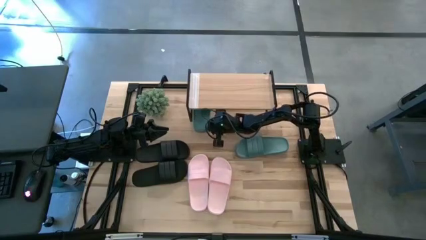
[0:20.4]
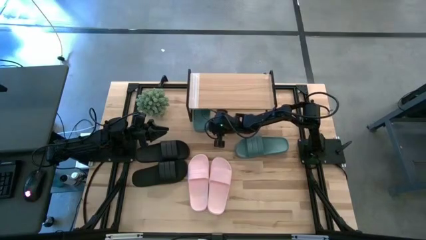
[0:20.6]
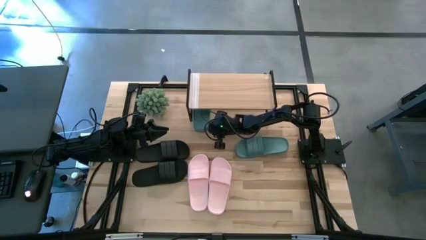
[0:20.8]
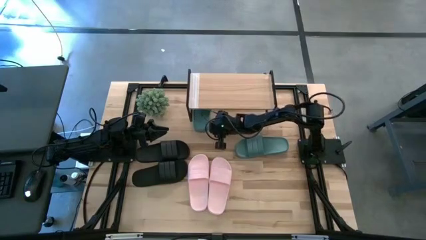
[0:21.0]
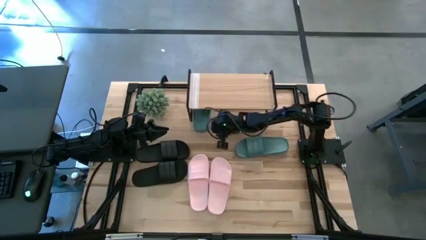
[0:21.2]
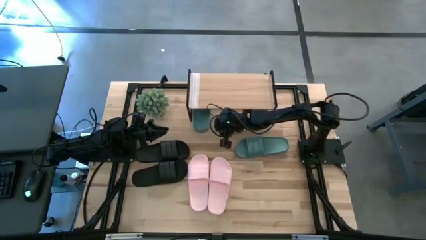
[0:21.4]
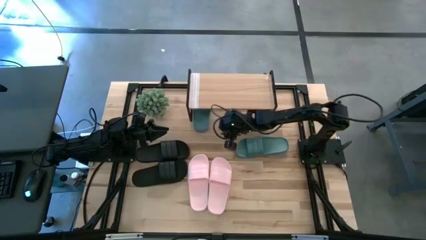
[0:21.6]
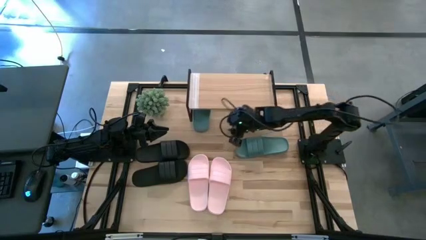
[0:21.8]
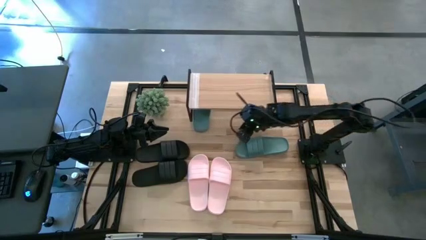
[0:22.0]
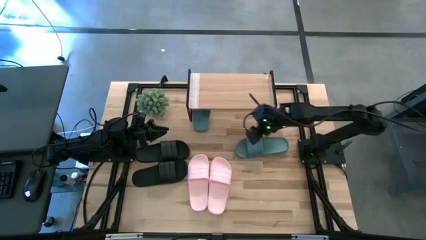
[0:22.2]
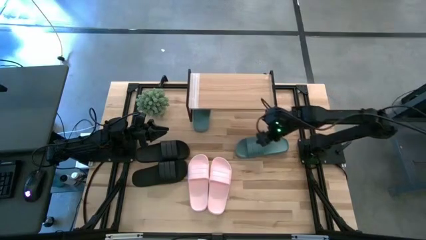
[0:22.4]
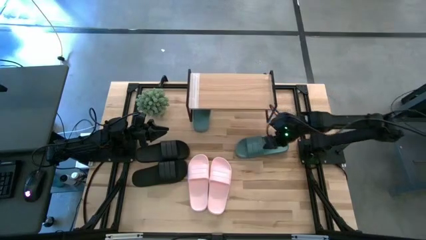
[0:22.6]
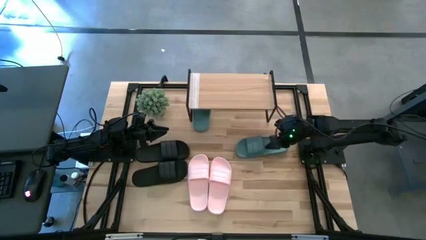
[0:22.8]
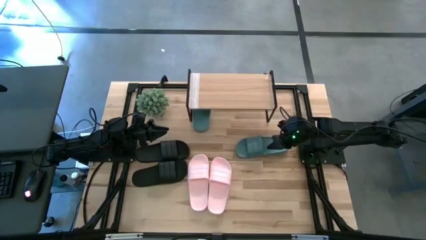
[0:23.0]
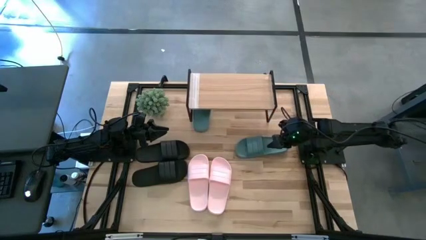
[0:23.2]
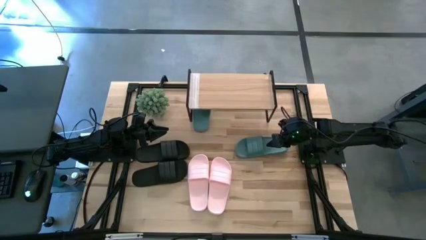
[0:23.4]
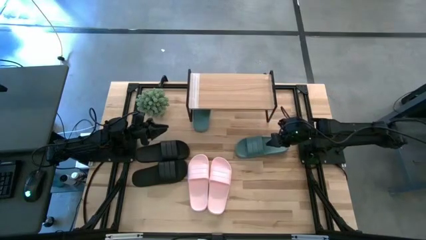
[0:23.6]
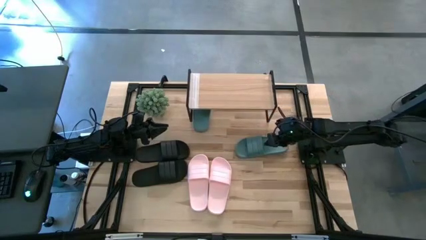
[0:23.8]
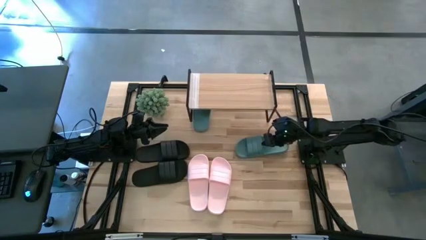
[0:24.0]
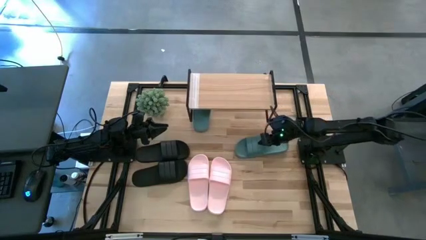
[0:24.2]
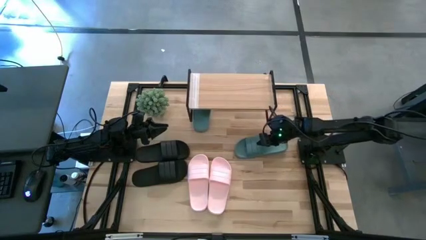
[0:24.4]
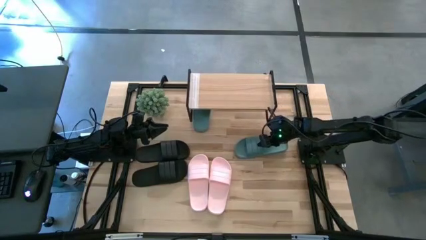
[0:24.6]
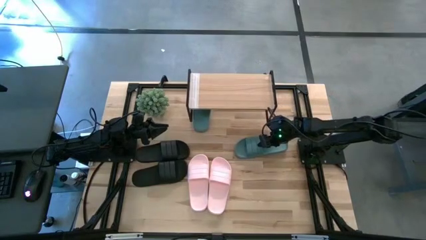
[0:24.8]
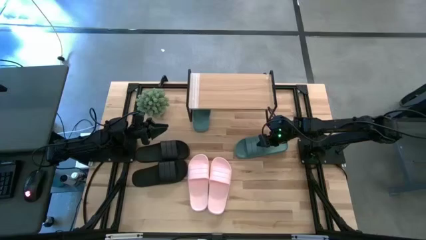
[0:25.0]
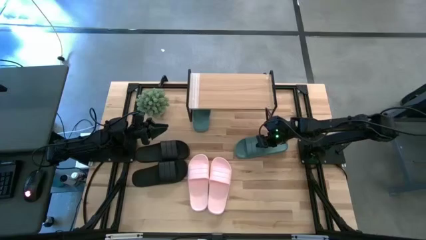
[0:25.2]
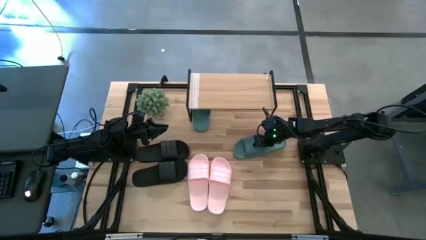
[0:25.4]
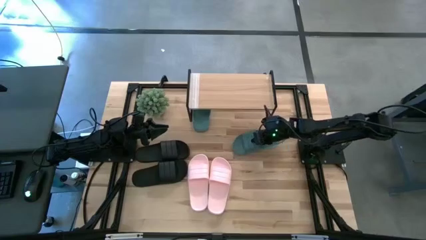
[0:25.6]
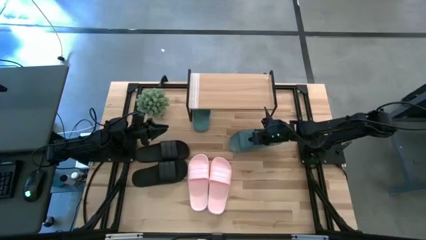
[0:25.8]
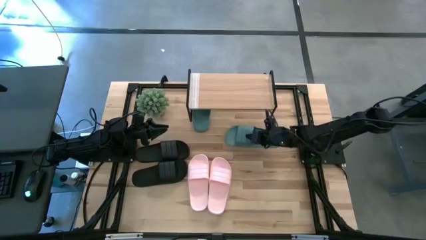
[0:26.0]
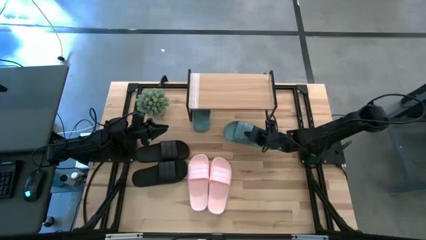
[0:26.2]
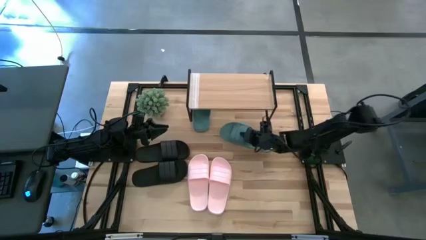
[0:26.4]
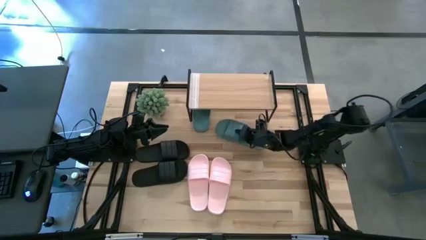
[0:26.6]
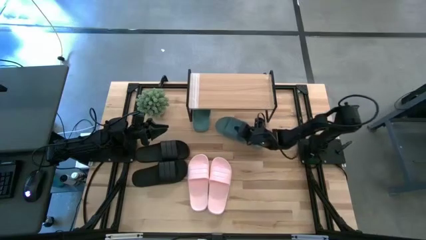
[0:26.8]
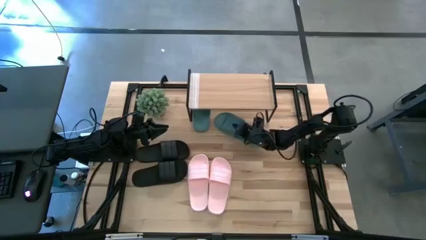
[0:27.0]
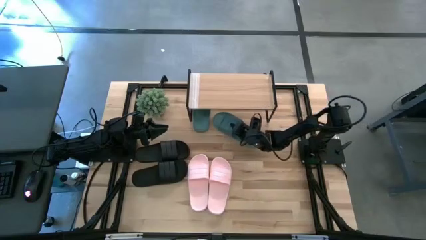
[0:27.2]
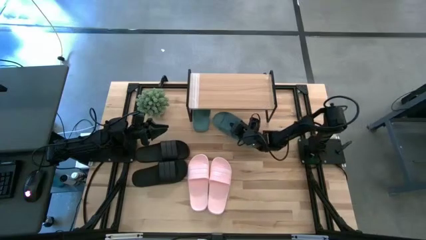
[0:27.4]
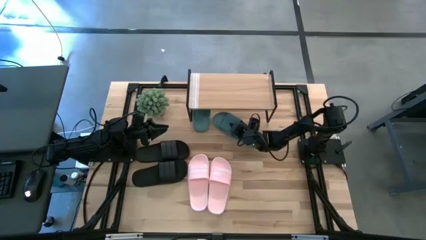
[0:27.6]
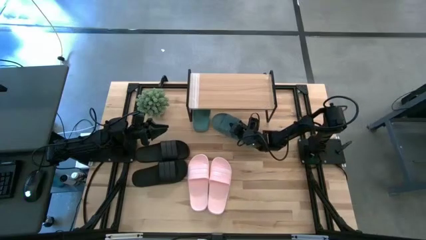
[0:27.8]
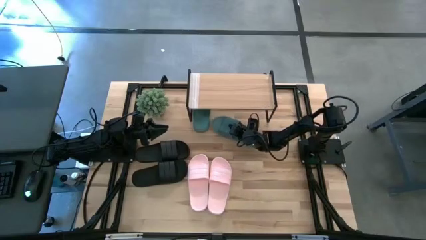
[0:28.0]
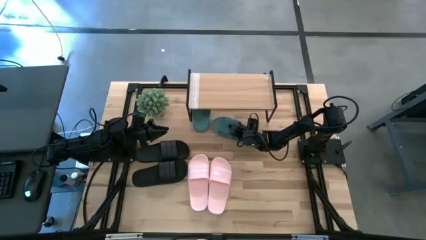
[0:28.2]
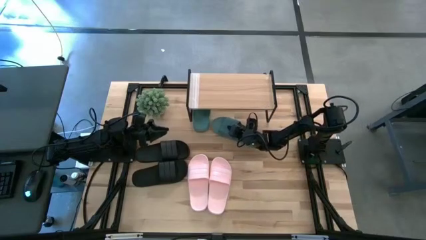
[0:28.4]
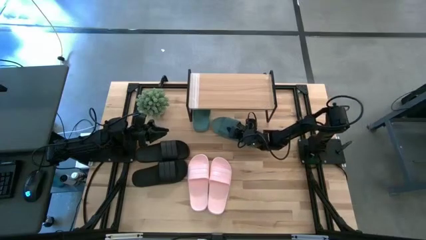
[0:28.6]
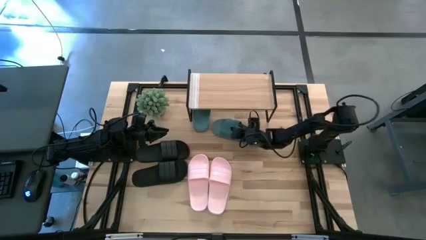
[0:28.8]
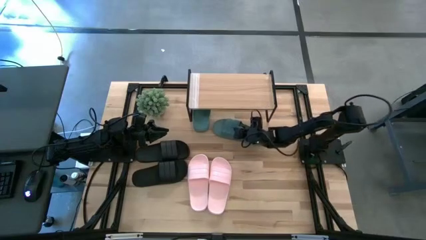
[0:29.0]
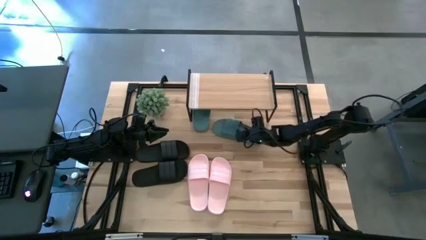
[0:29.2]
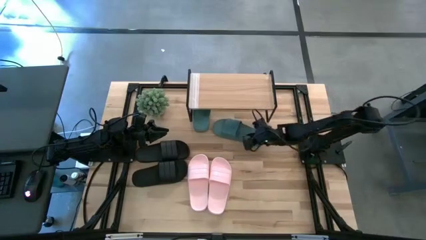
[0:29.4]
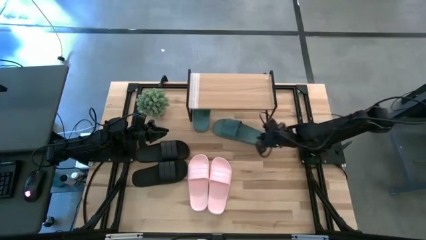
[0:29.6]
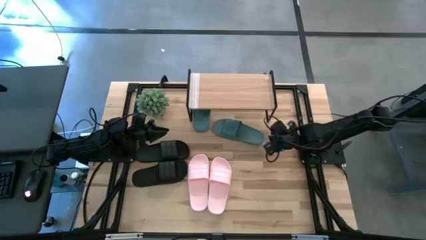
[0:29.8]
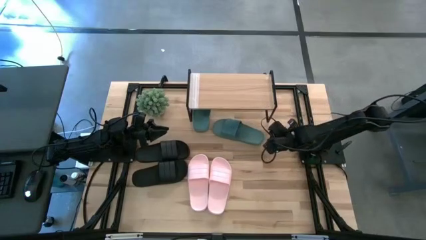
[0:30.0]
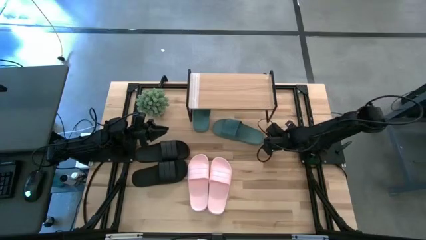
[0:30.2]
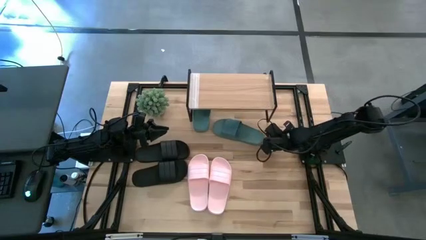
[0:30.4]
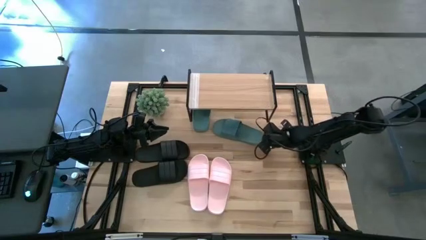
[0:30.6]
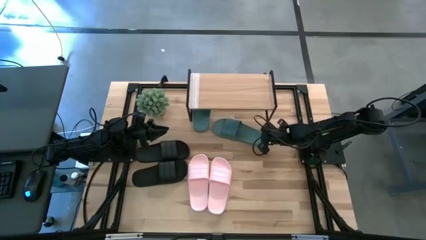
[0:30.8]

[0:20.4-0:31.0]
Task: Pick and place slides into the shelf
Put the green slides under the shelf
